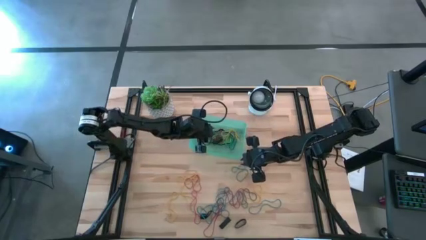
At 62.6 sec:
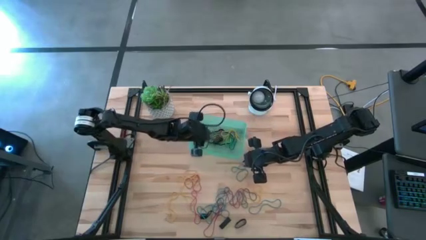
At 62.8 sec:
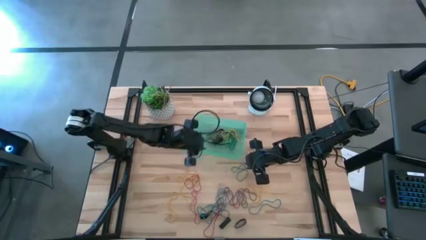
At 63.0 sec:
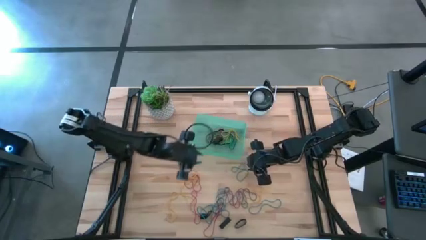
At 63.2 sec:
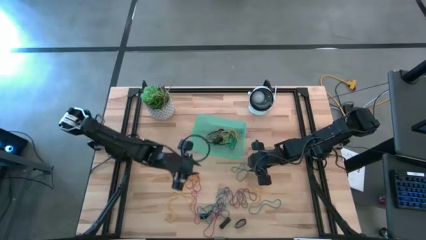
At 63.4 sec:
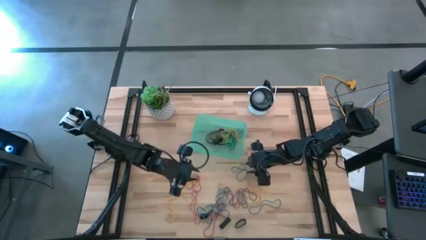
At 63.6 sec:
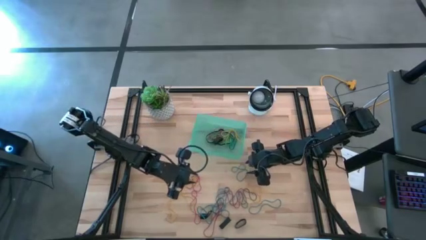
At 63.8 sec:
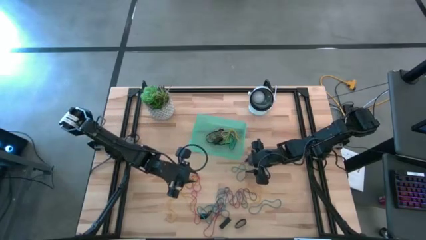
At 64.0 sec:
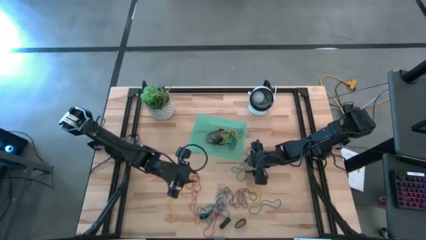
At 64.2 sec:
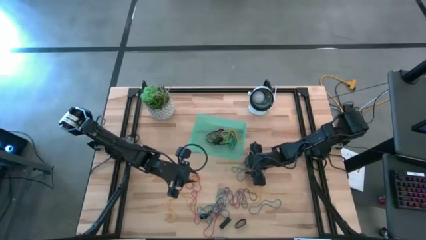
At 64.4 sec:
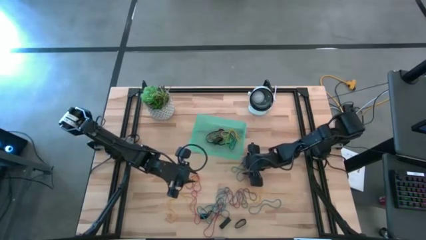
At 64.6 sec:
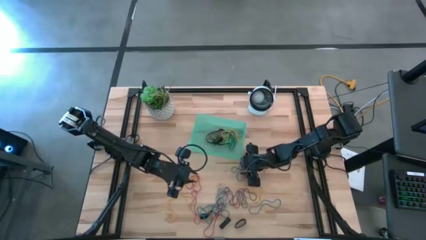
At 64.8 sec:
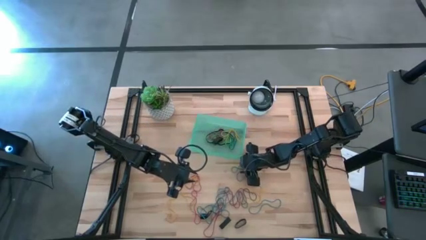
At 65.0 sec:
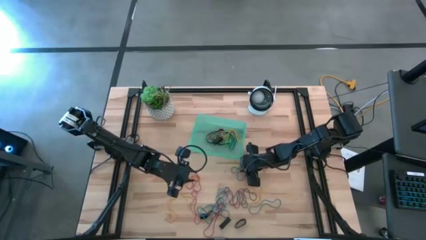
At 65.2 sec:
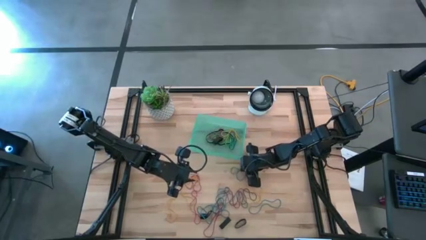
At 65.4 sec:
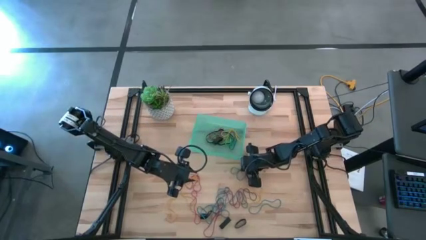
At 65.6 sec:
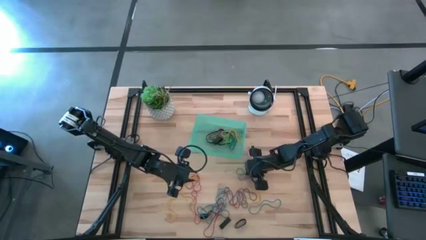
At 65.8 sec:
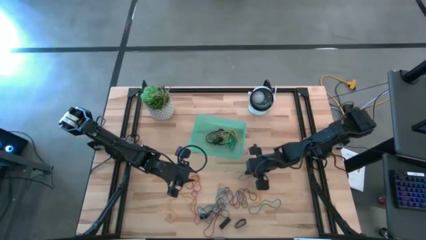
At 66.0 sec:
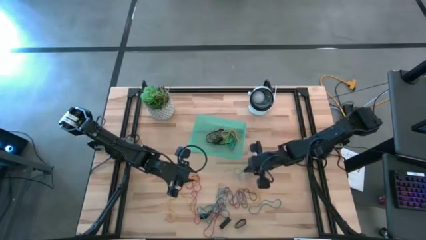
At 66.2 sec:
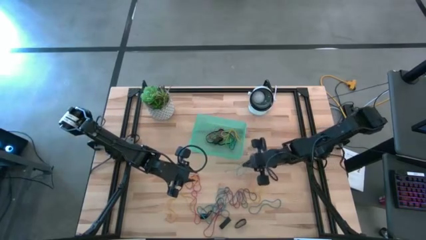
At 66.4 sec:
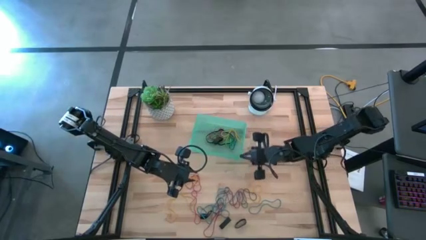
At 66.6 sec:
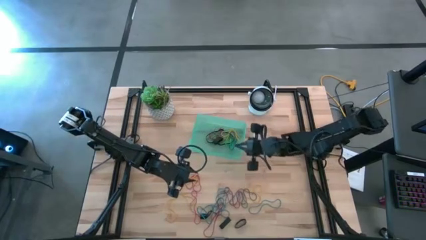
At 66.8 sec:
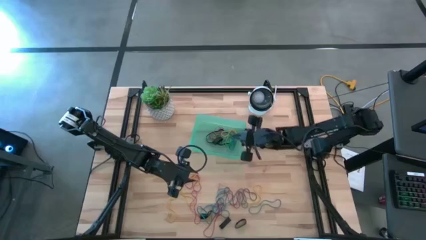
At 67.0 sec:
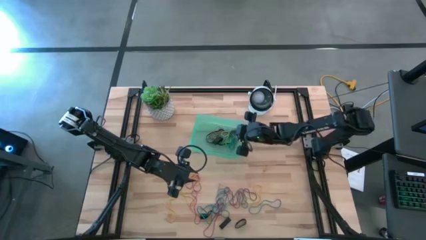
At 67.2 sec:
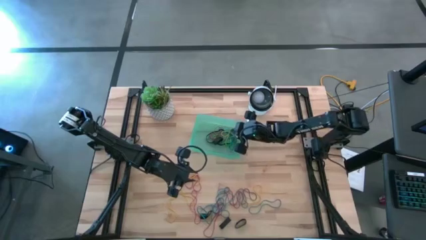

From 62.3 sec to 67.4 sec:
Task: Pick and place rubber bands into bin
Put the blue rubber band into the green bin

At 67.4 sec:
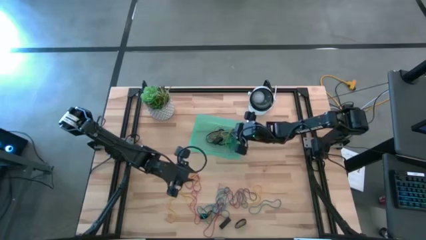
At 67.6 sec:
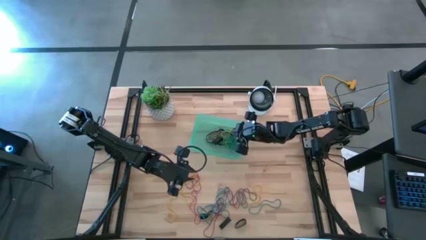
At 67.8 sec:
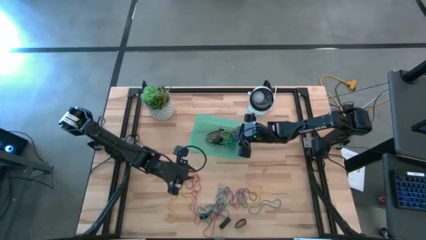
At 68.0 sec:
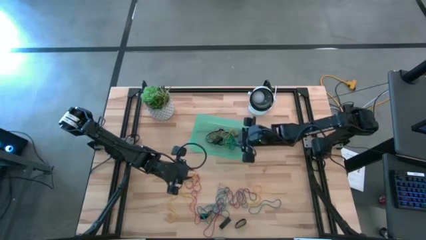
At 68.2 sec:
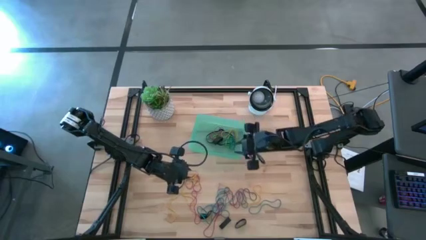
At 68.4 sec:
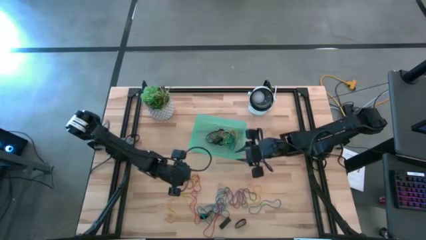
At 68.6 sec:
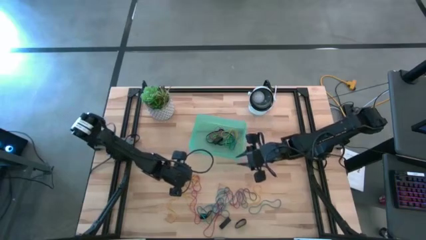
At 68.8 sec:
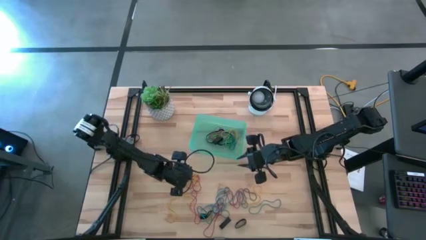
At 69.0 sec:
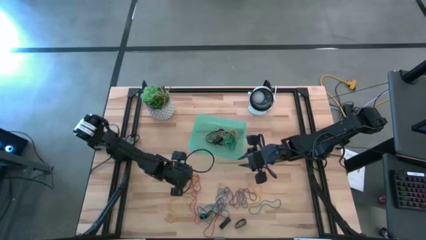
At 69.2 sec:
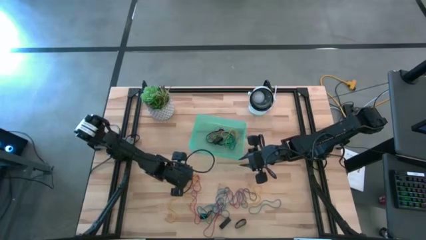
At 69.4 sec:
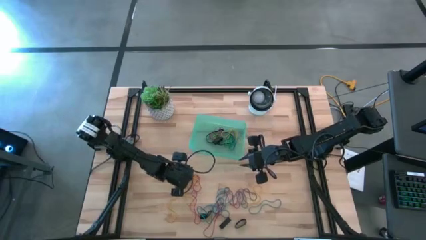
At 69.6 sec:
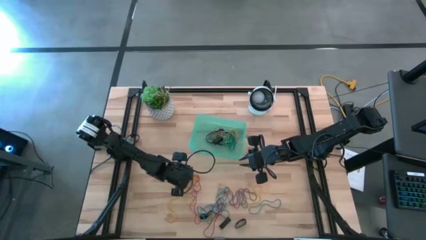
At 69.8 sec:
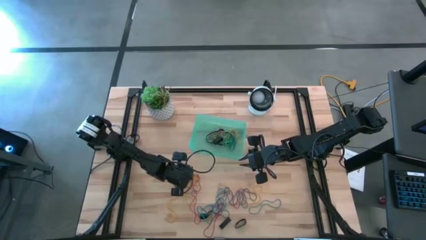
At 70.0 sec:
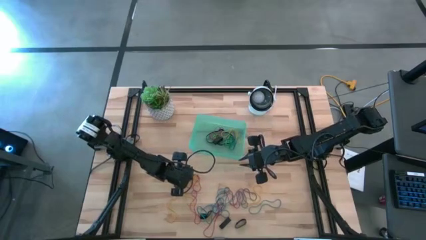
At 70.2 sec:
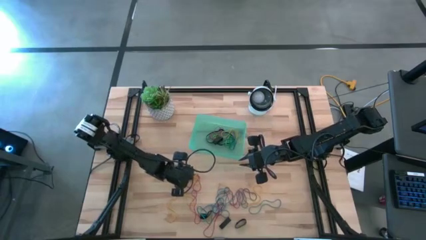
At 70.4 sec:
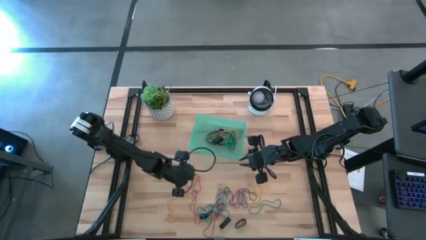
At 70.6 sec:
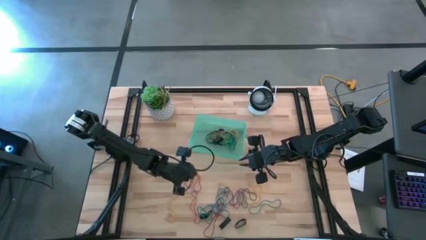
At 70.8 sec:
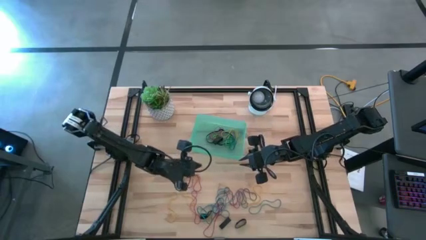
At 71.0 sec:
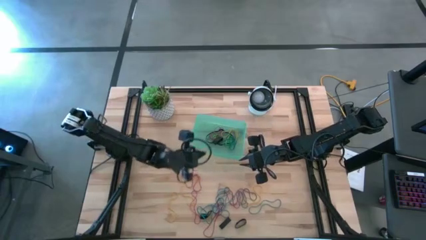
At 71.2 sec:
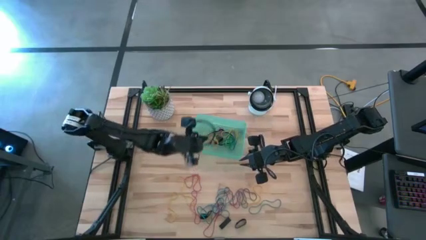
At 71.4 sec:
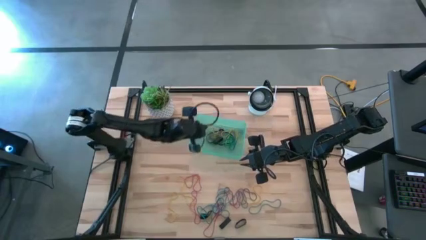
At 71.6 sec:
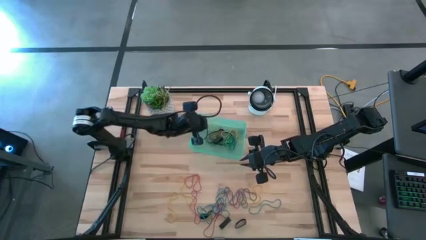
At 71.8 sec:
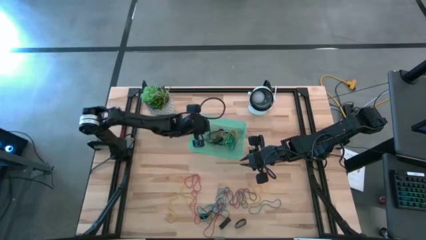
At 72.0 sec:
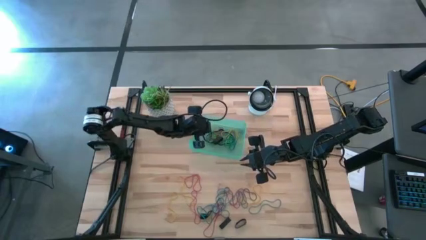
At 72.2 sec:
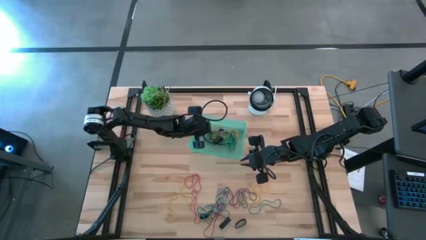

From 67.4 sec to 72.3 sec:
Put the yellow rubber band into the green bin

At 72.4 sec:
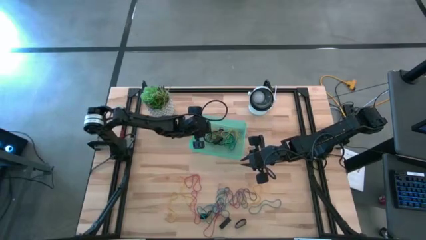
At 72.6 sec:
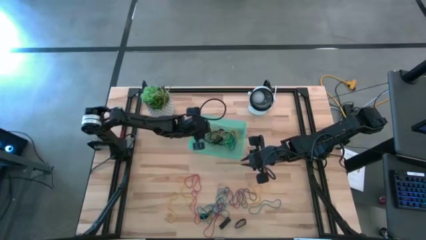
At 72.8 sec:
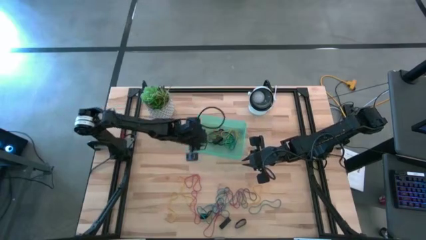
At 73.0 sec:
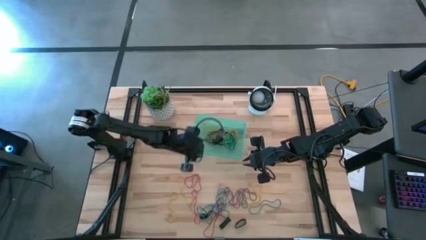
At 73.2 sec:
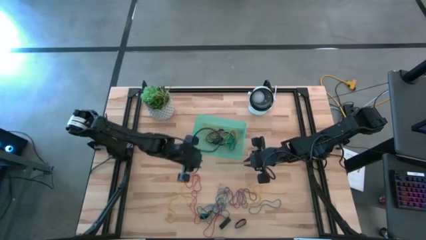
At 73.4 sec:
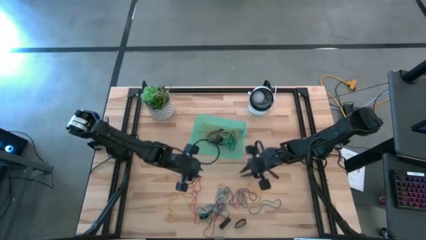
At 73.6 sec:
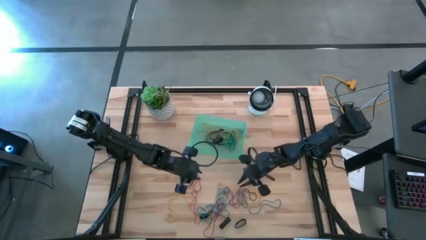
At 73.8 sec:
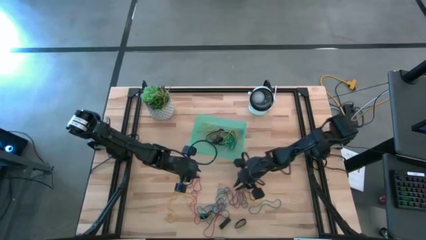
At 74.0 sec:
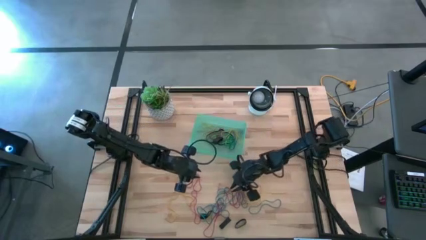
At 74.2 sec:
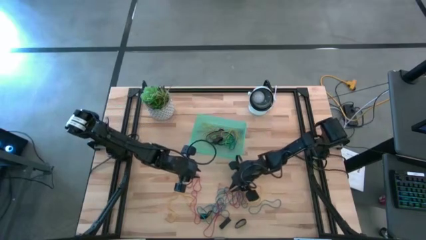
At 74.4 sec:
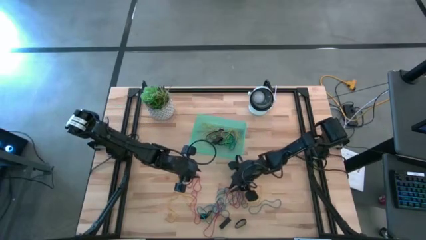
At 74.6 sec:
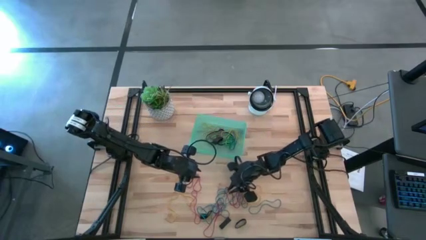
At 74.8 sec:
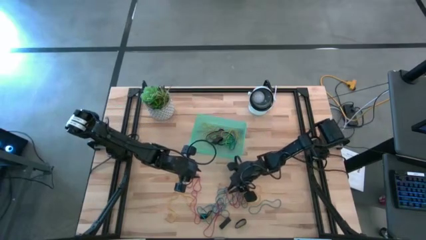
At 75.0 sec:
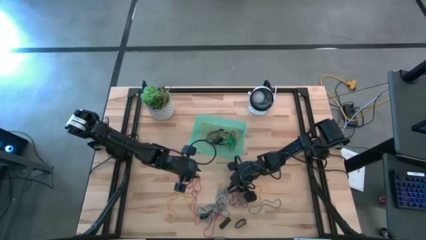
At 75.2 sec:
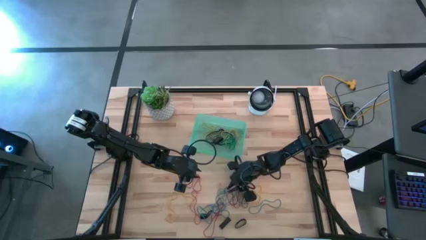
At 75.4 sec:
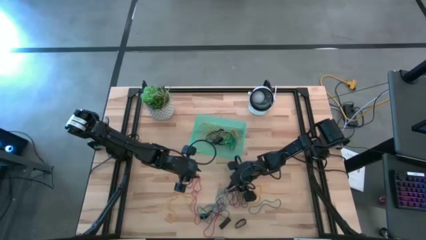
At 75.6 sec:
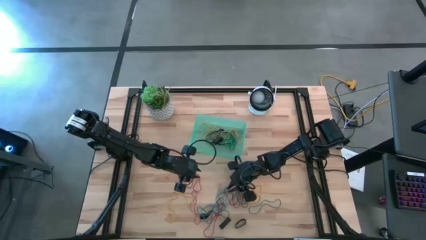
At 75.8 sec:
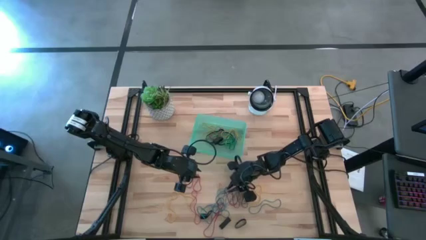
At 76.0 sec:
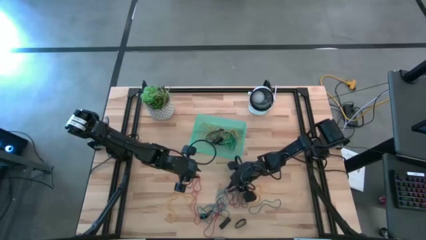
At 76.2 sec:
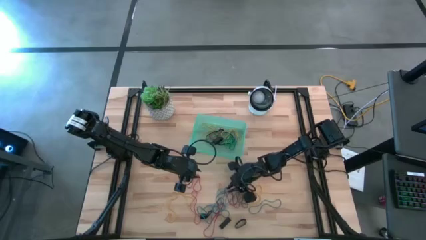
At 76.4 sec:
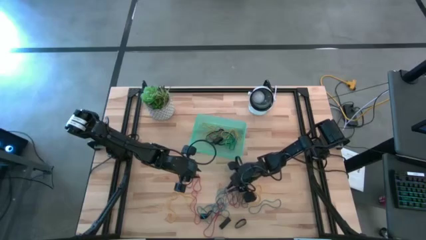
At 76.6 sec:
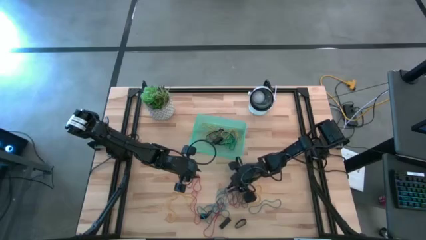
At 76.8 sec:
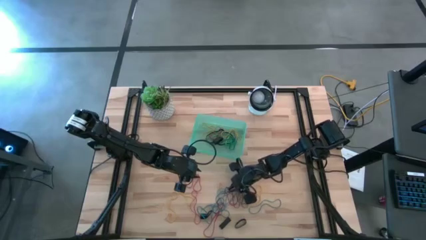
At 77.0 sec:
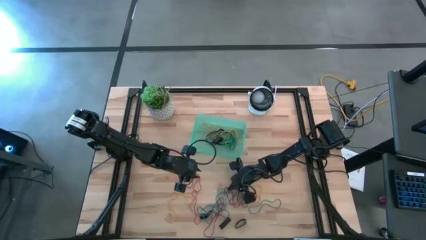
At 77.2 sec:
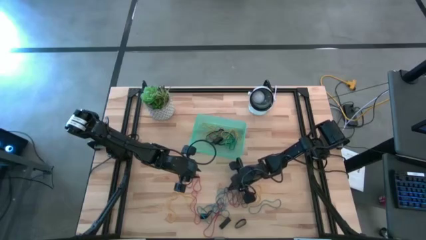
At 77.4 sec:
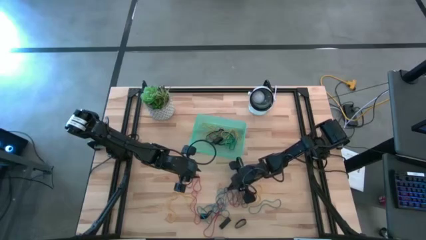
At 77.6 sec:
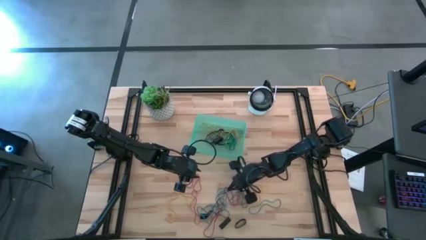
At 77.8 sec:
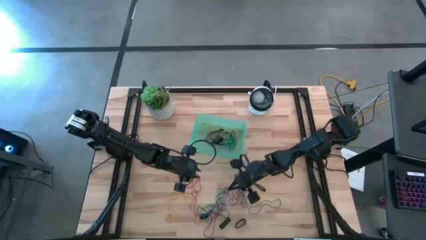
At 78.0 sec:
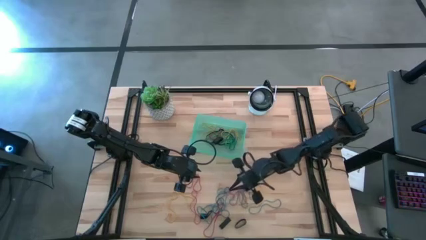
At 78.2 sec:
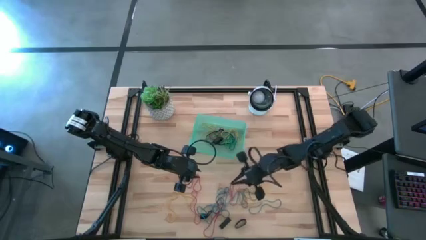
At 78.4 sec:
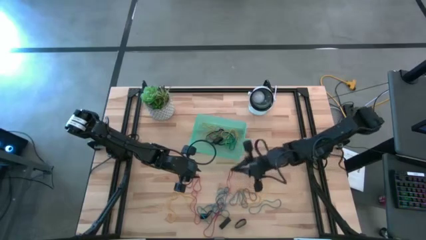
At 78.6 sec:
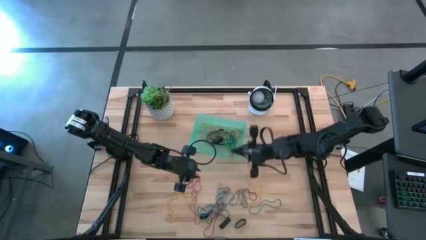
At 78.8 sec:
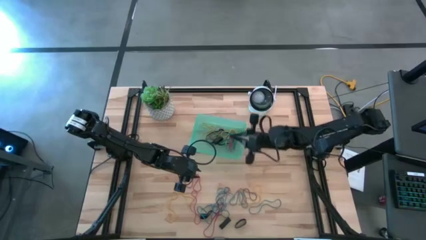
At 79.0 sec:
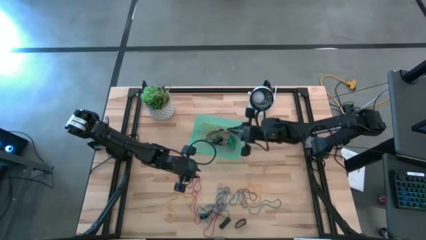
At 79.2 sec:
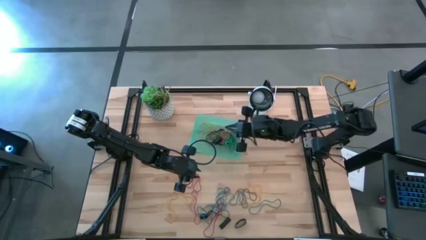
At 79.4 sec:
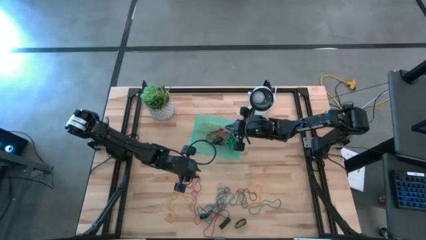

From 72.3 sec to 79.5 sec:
Put the red rubber band into the green bin

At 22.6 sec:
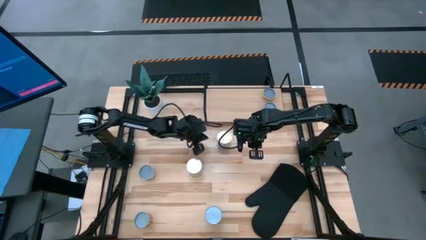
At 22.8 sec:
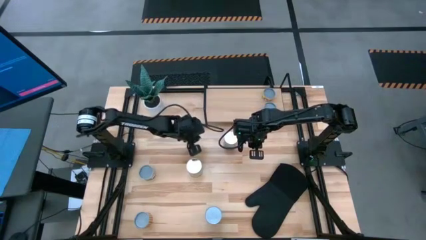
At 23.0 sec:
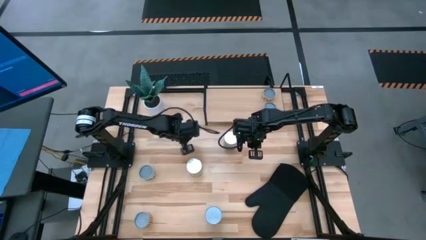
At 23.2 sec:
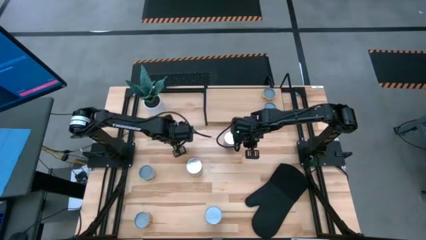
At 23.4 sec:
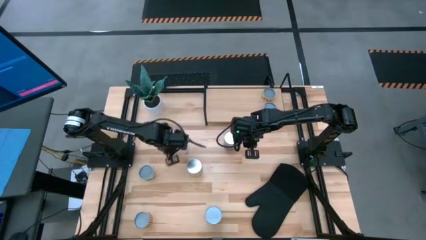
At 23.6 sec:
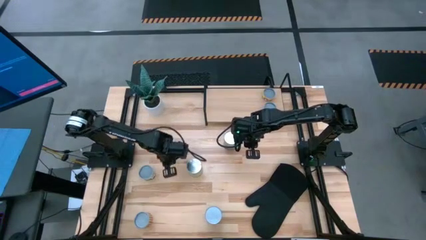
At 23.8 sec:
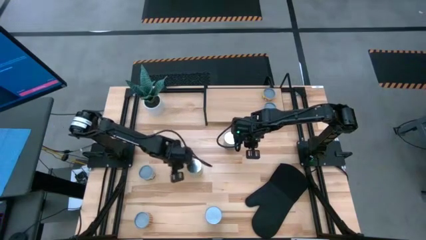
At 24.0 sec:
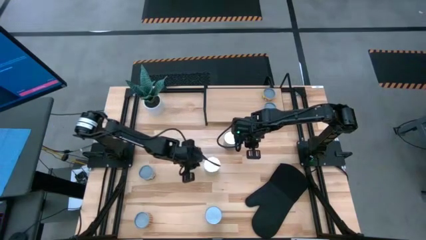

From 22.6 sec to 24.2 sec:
Task: Pick and place cans onto a shelf
Adjust the canned carrots in the table
